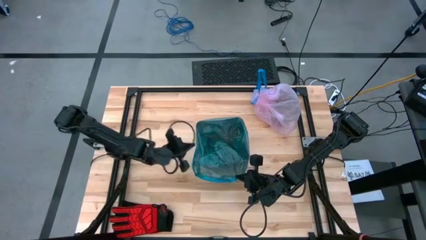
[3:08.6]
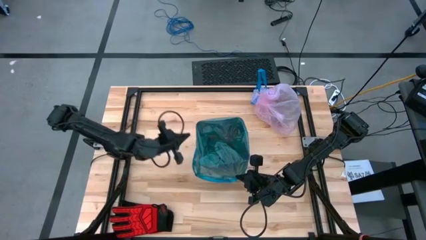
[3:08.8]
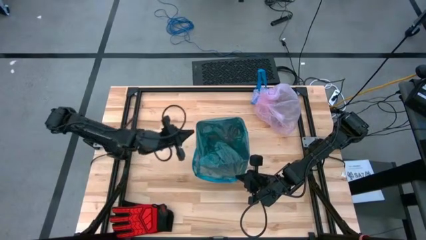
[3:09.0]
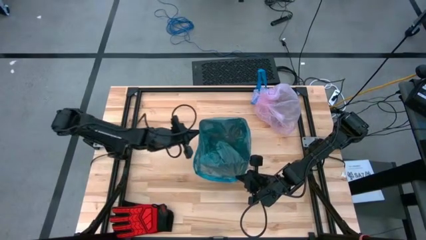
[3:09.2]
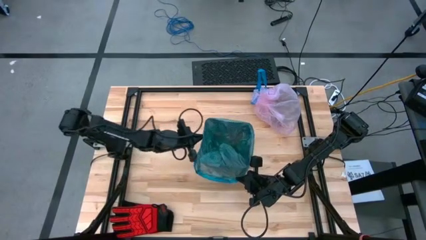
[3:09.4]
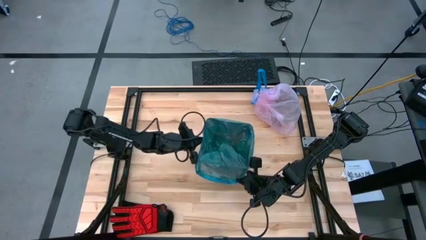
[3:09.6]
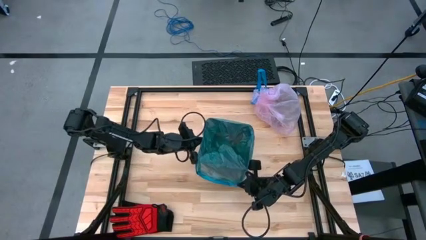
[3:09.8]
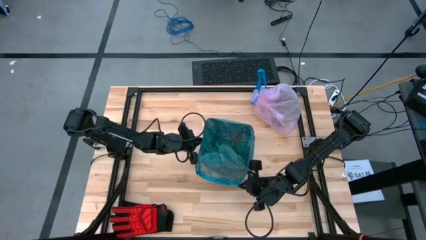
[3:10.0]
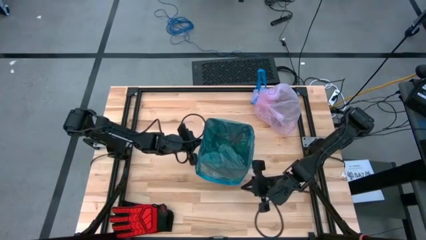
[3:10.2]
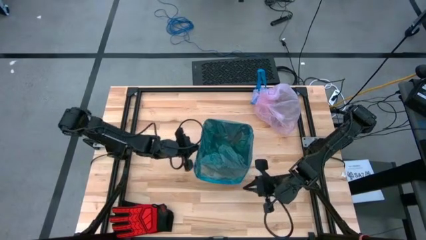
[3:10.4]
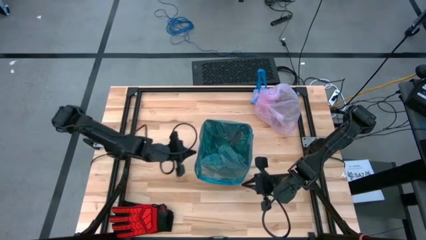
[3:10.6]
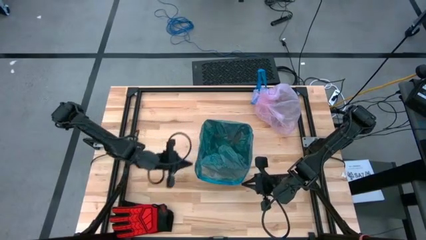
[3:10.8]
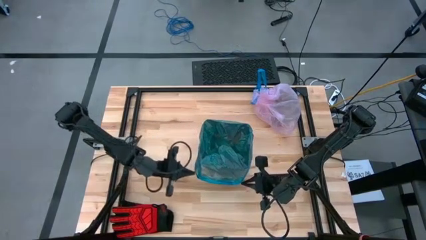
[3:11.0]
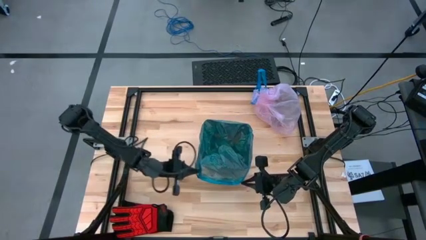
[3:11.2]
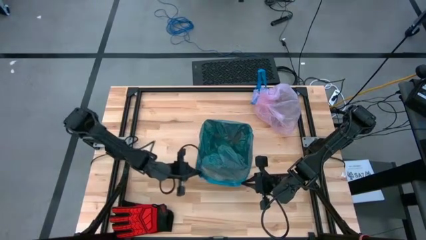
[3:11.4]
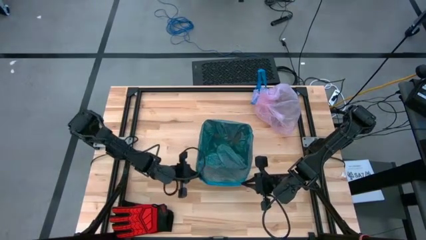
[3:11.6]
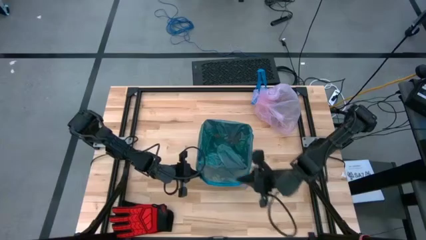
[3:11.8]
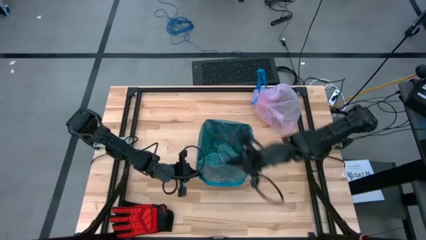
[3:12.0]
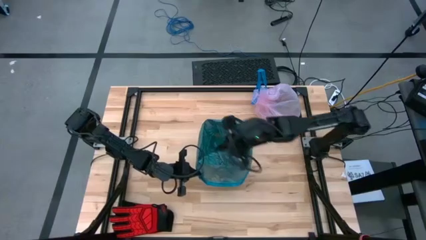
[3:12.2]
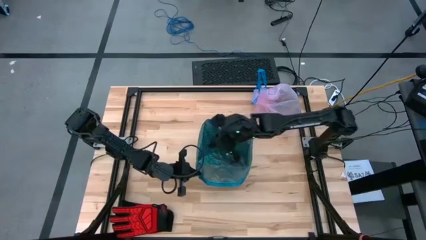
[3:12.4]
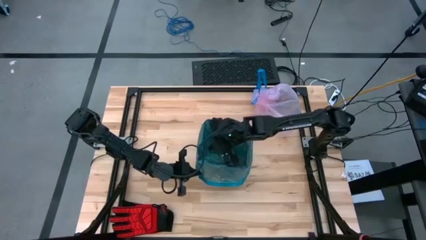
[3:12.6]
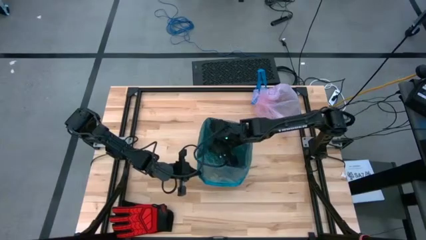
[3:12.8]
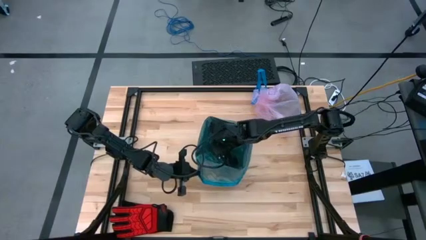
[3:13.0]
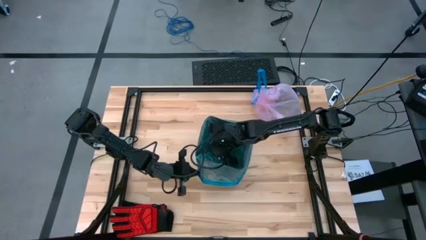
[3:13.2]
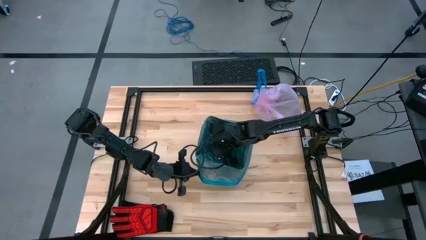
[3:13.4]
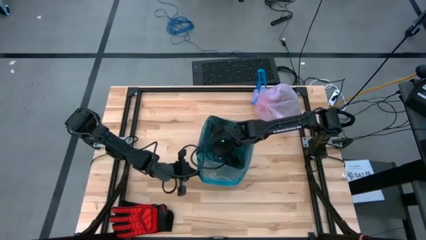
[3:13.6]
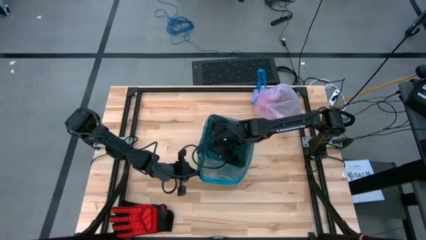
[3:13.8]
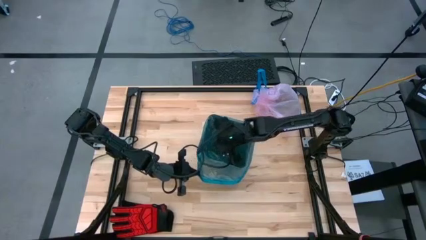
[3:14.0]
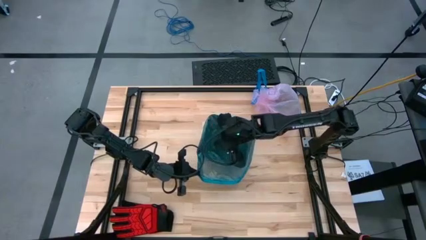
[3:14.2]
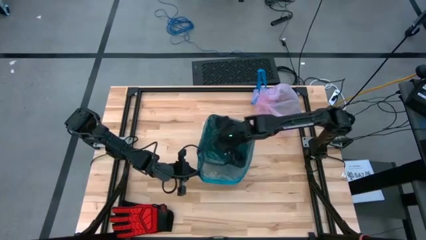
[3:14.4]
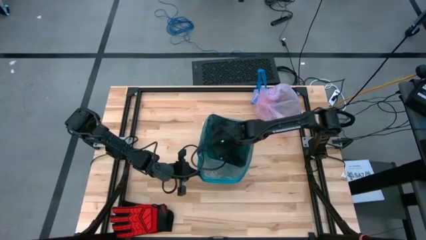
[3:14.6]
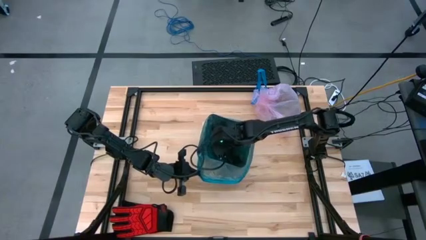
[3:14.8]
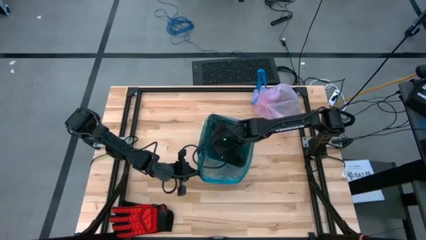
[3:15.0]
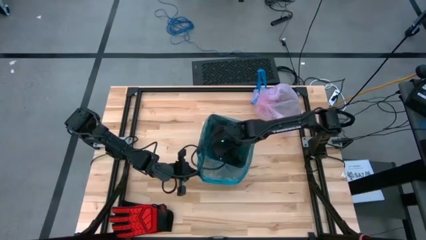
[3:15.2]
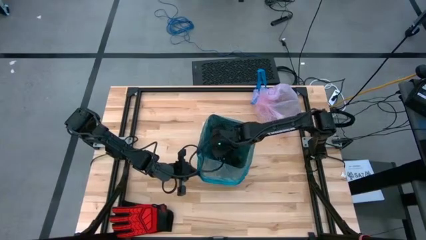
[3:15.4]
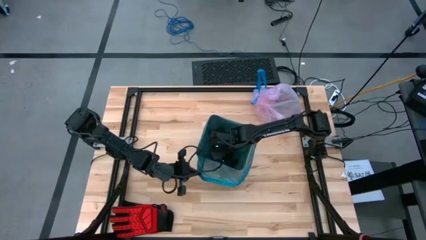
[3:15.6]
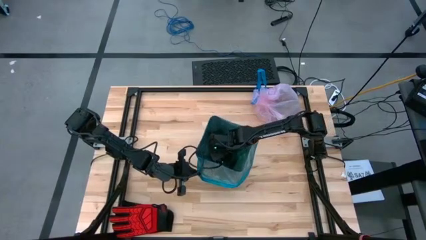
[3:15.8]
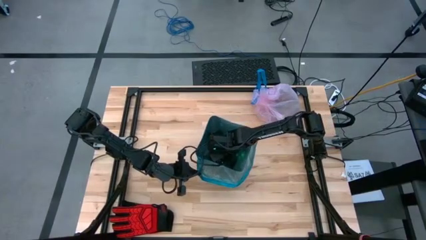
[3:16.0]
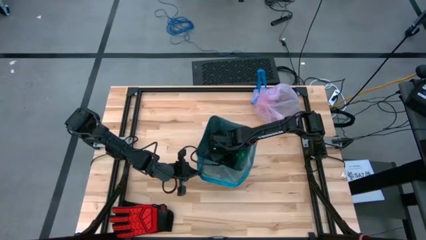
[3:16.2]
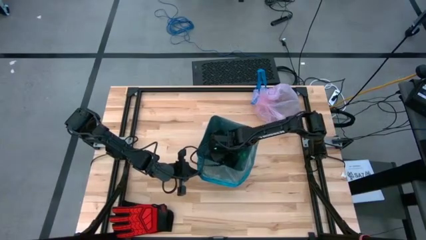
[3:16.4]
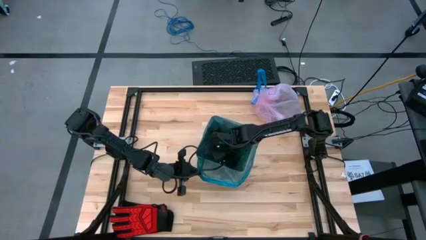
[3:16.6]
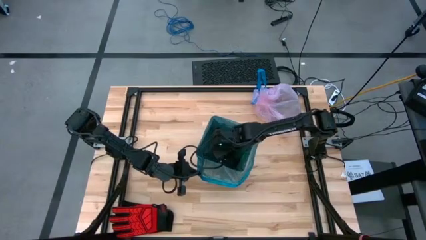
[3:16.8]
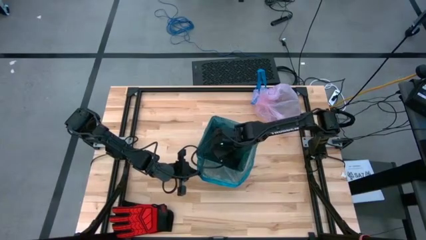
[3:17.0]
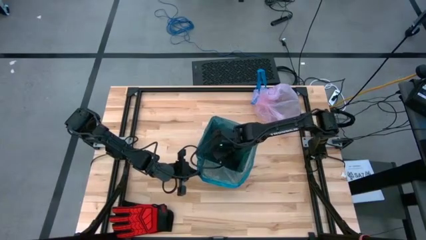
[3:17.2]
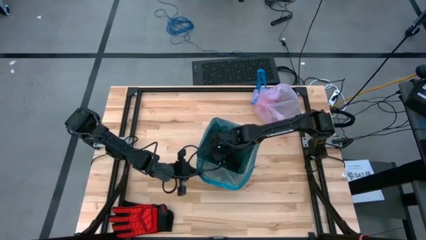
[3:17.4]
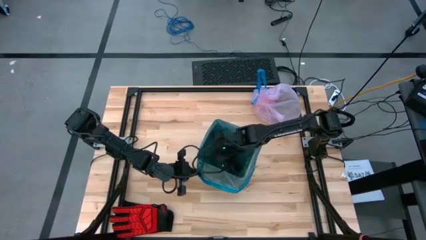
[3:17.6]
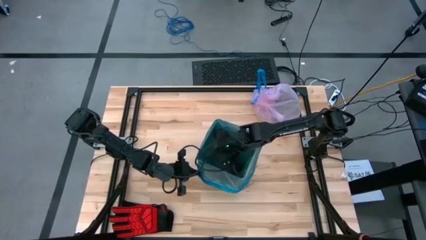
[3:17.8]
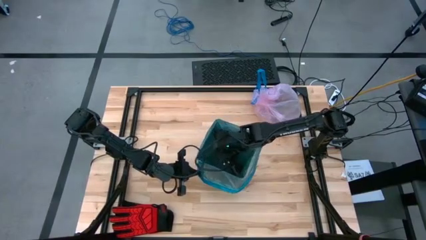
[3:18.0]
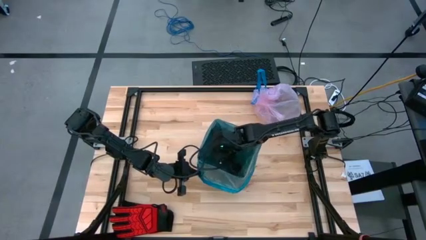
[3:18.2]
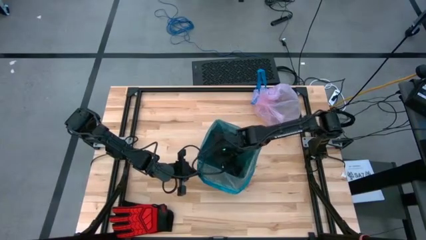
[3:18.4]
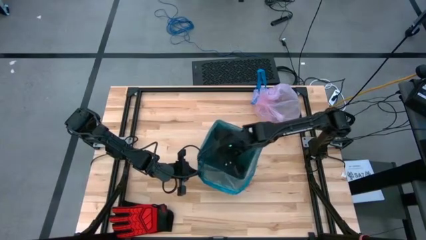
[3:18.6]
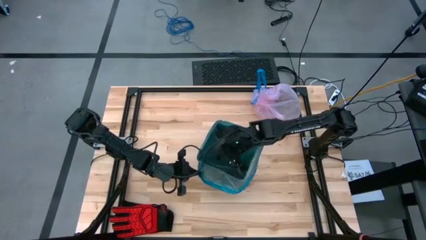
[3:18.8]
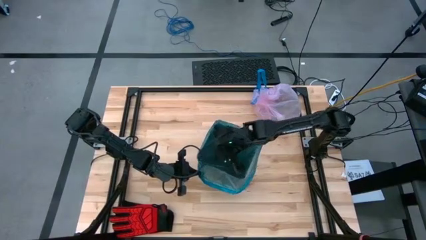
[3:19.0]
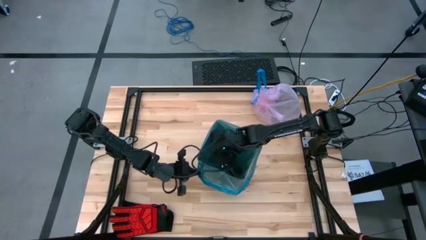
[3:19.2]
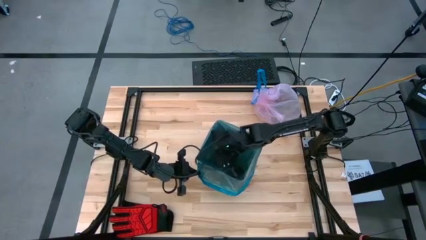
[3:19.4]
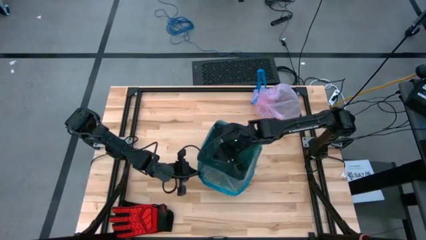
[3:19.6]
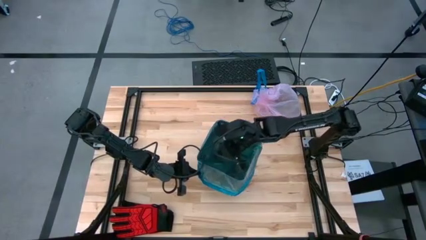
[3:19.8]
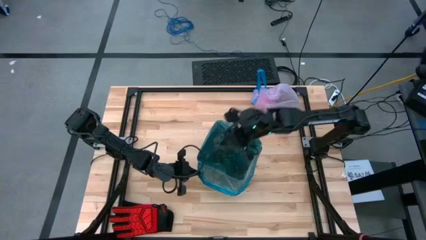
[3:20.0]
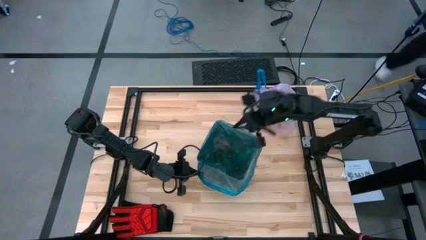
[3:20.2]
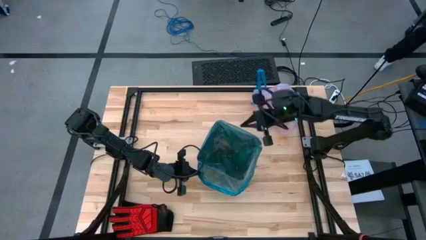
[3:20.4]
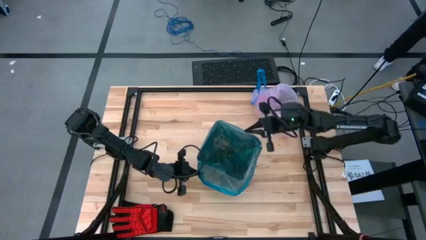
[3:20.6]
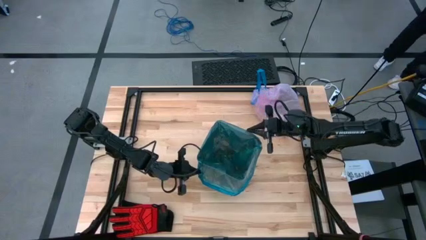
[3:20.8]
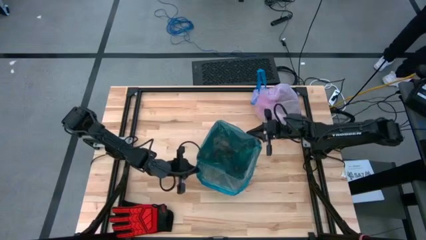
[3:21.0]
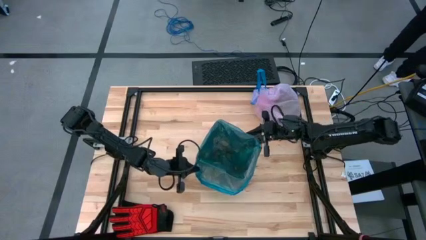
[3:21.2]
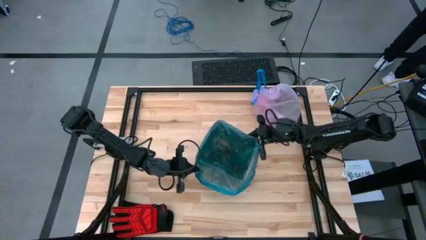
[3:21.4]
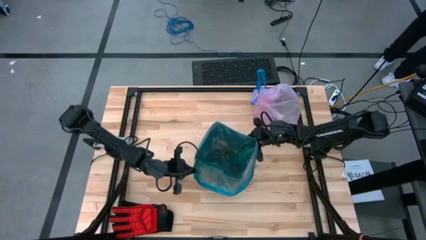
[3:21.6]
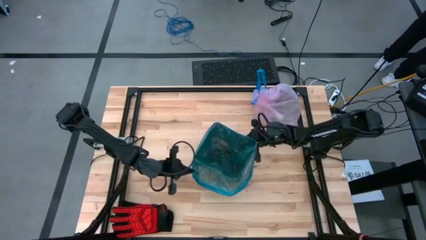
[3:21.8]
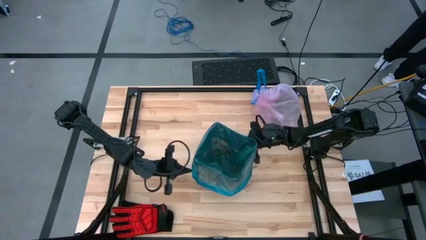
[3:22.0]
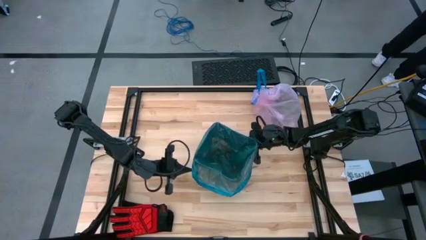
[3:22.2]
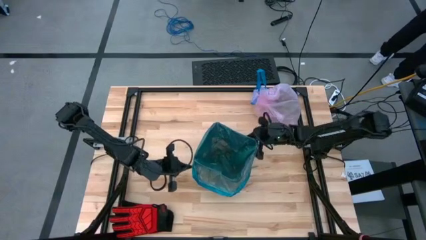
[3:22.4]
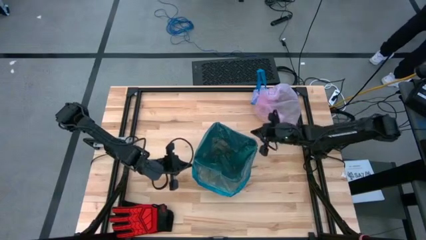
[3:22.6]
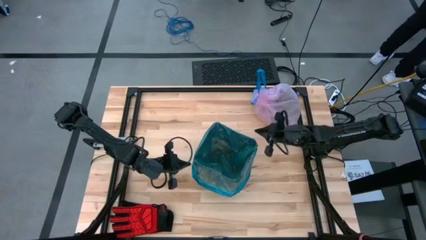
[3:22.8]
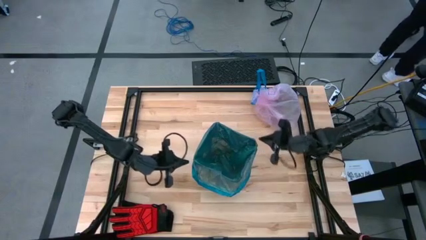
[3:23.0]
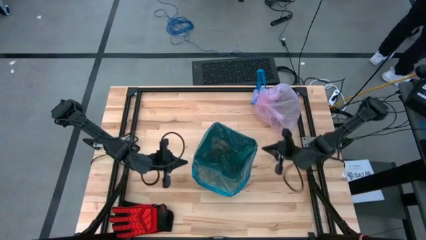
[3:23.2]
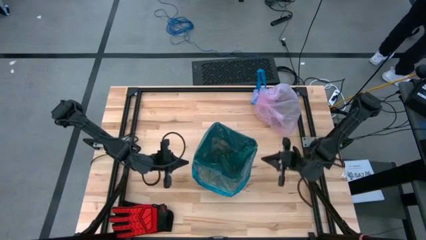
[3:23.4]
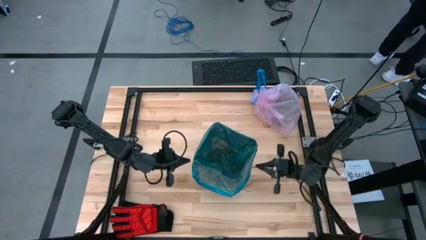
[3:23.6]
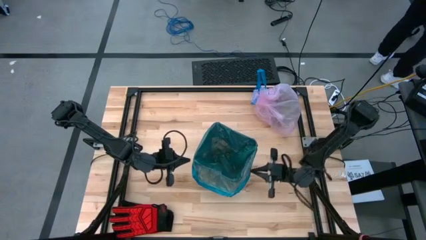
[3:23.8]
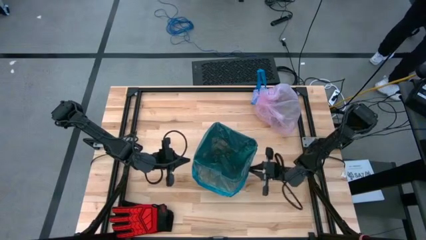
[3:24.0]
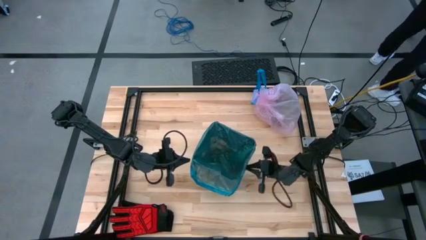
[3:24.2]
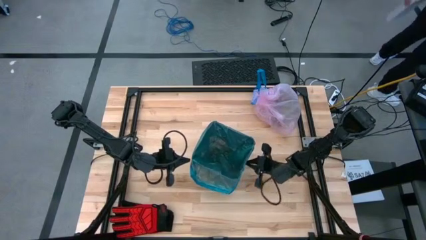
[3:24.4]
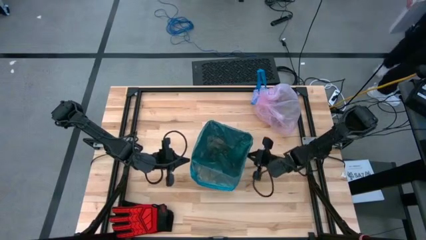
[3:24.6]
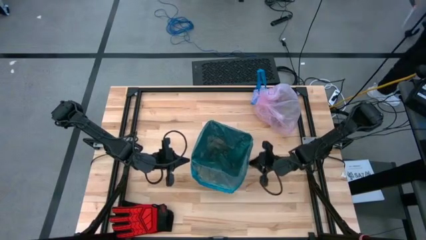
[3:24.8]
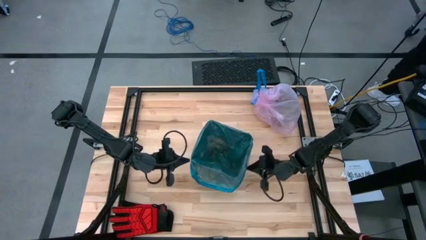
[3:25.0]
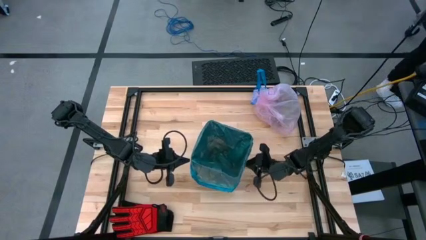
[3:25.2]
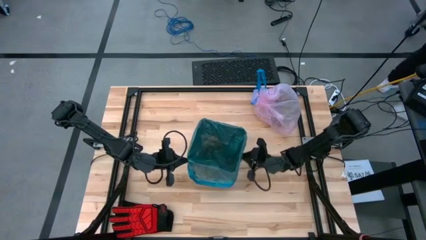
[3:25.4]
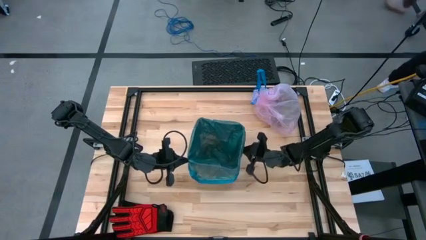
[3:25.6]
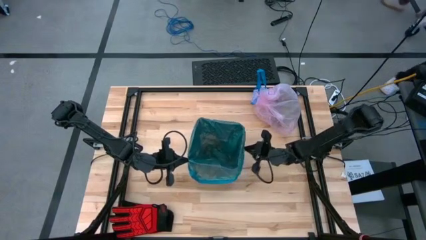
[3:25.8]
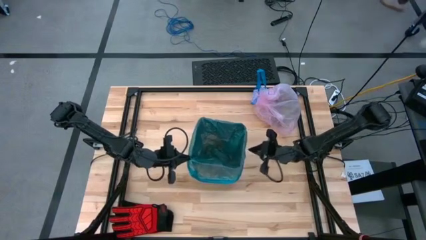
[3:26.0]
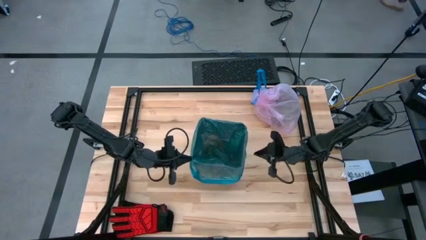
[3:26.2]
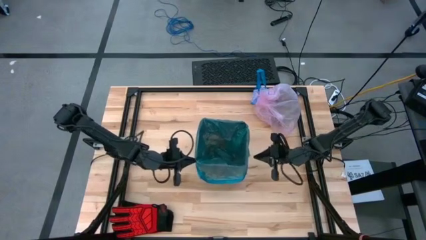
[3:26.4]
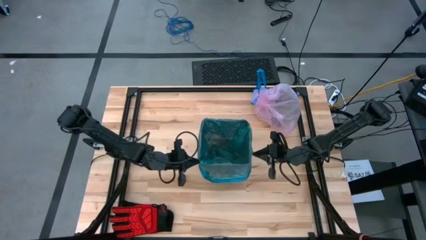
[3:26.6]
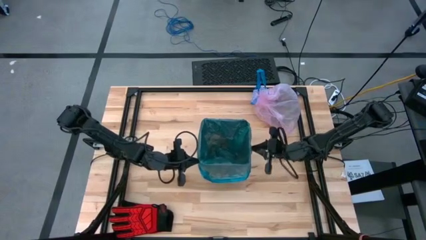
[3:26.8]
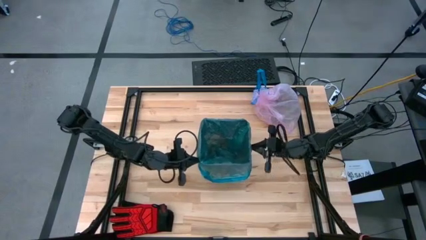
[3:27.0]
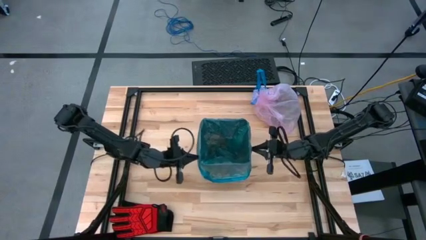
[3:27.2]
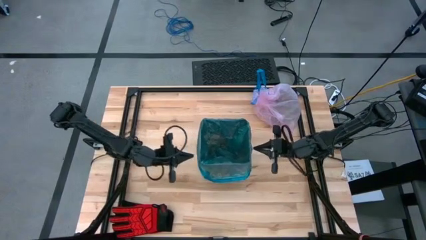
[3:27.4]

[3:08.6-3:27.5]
Task: place trash/remove bag and relplace
Insert a new trash bag into the trash bin
